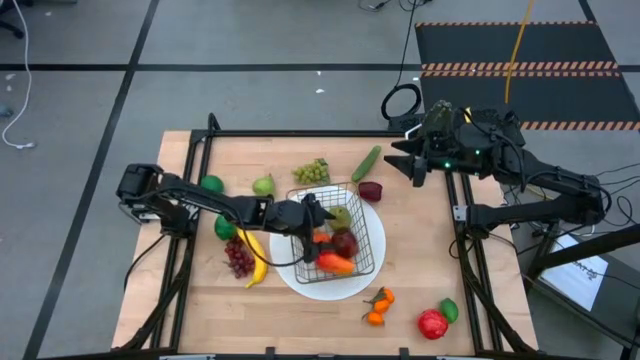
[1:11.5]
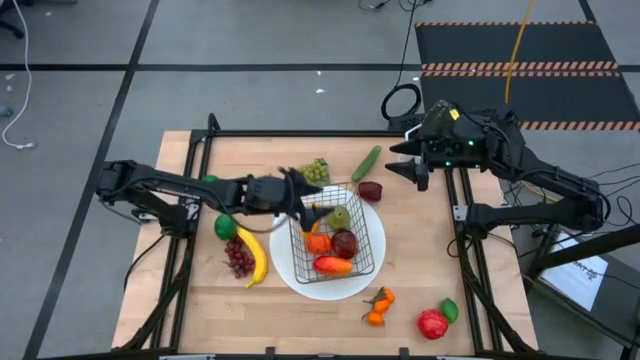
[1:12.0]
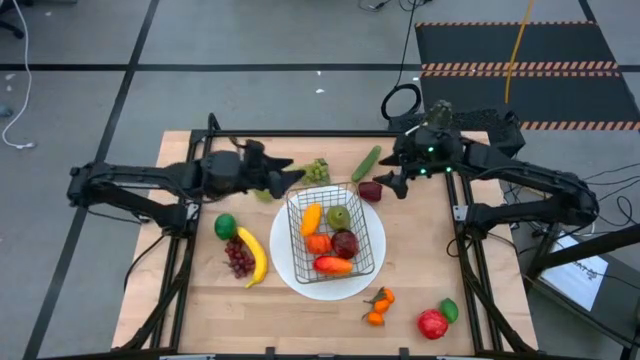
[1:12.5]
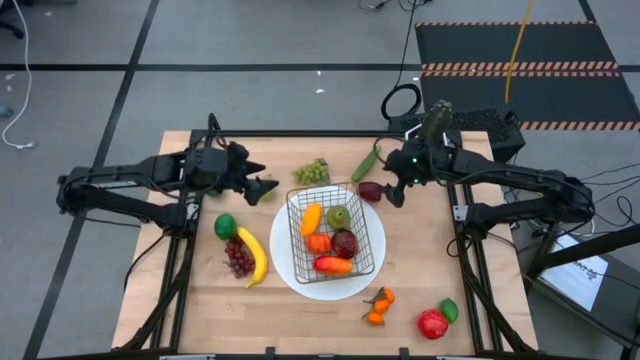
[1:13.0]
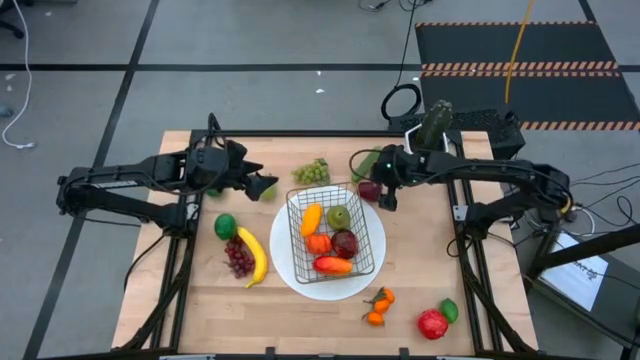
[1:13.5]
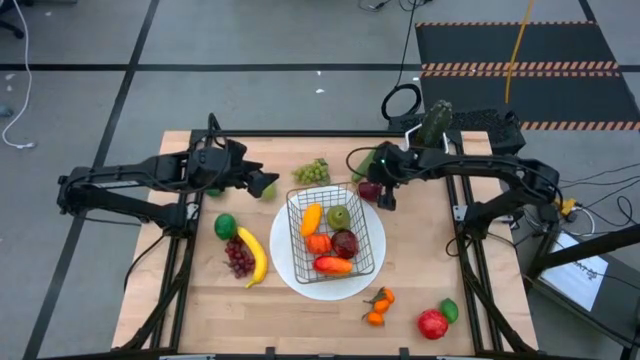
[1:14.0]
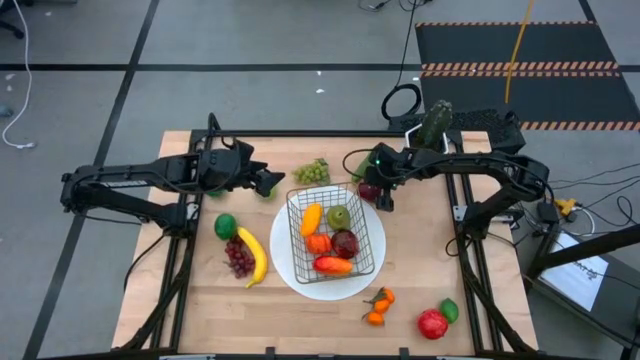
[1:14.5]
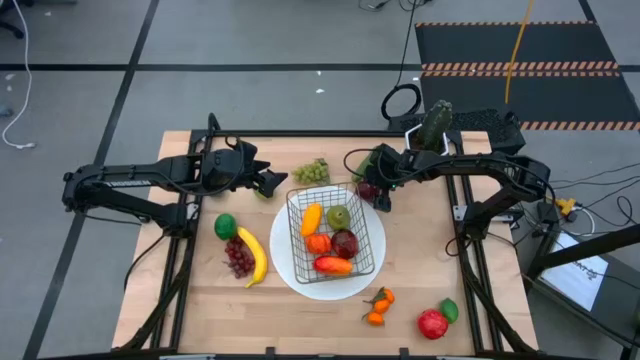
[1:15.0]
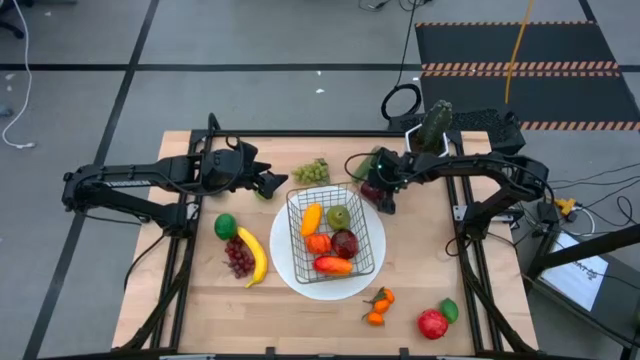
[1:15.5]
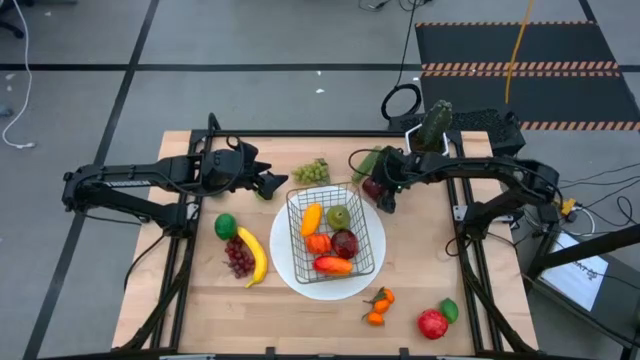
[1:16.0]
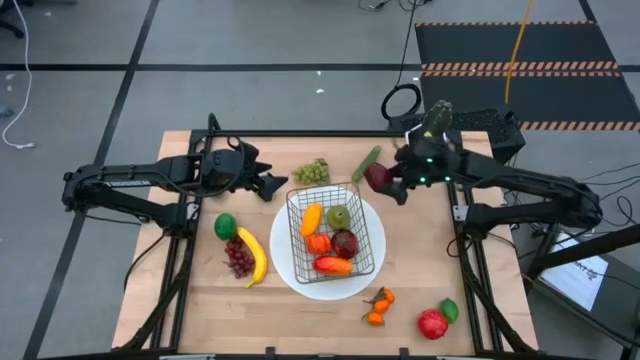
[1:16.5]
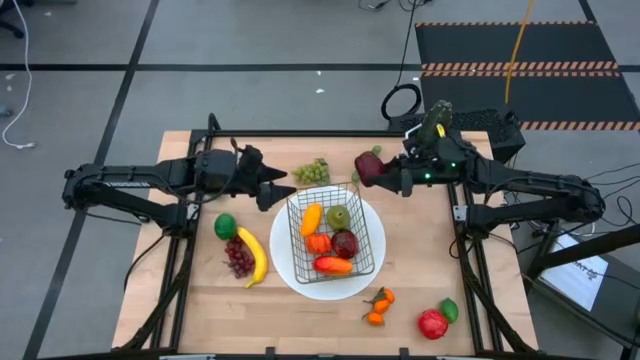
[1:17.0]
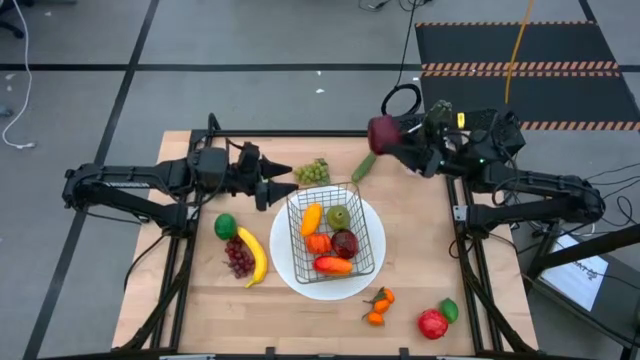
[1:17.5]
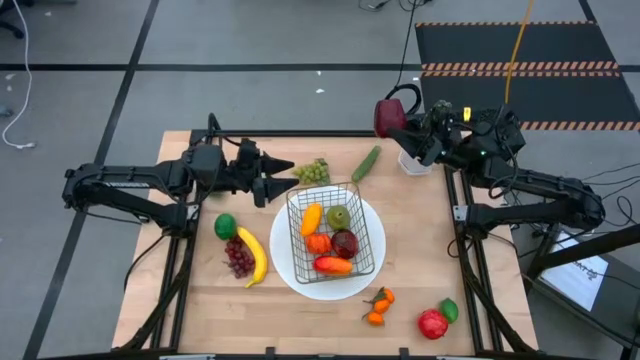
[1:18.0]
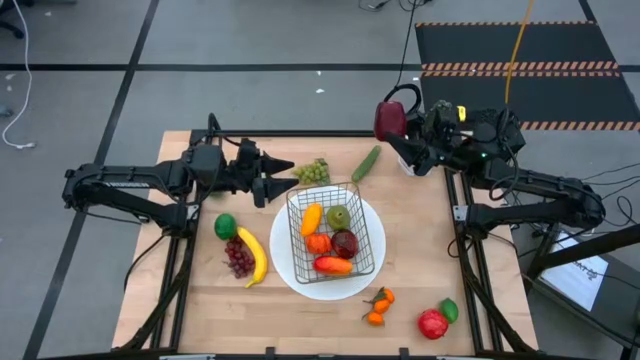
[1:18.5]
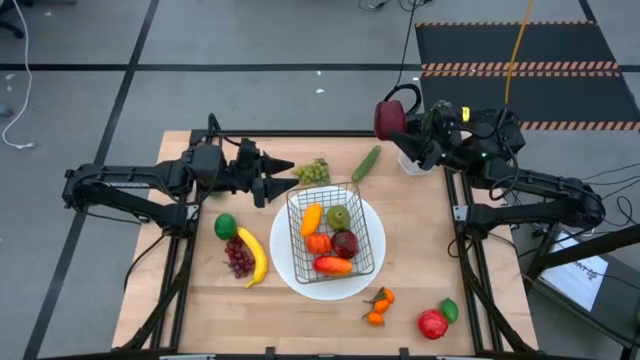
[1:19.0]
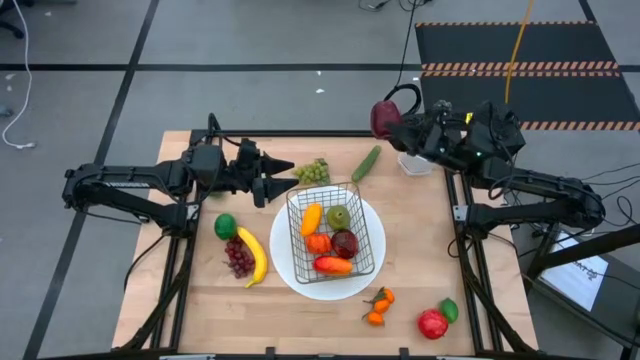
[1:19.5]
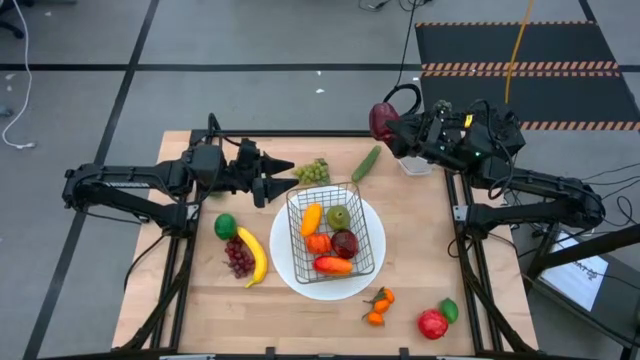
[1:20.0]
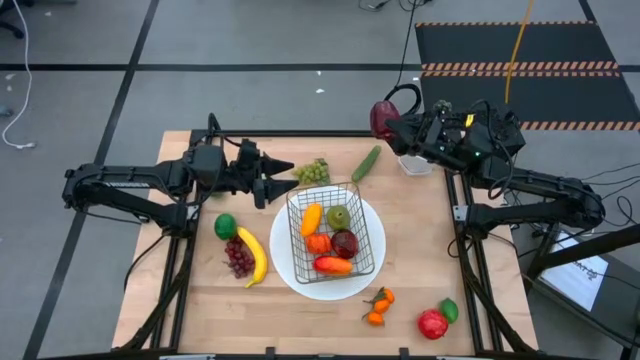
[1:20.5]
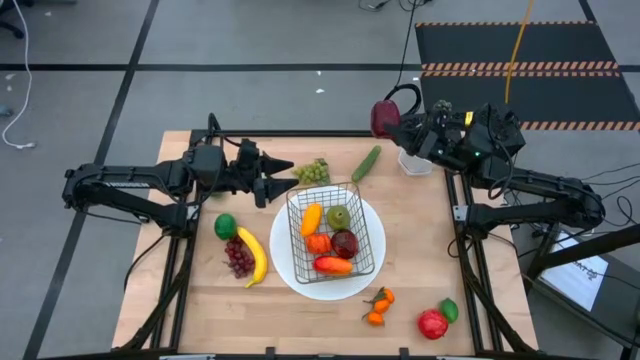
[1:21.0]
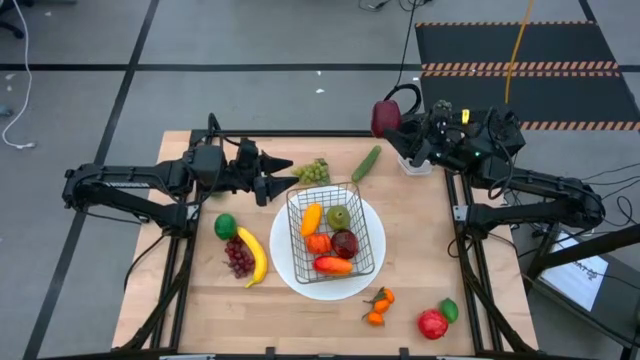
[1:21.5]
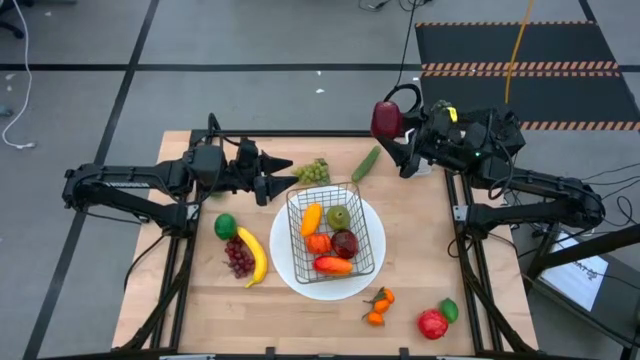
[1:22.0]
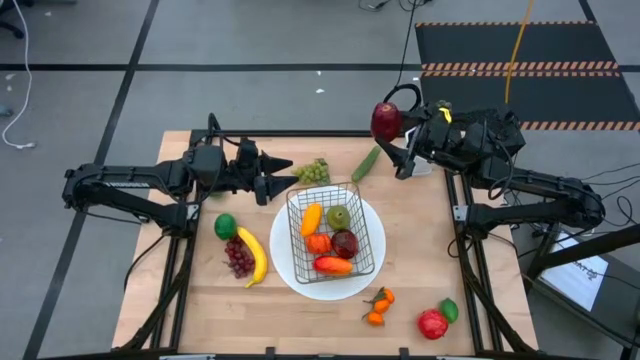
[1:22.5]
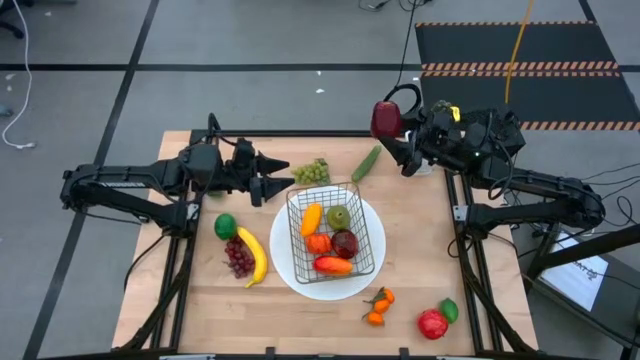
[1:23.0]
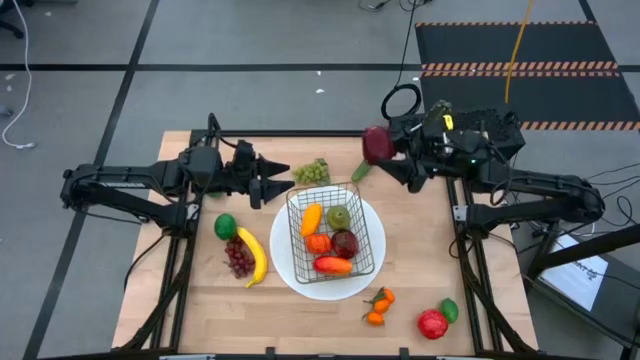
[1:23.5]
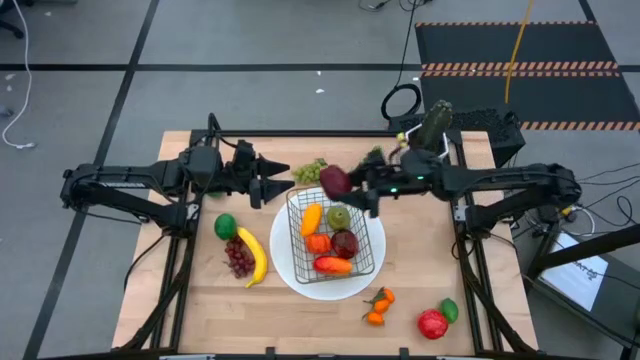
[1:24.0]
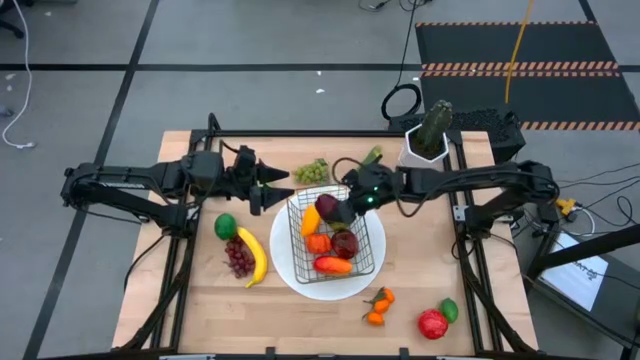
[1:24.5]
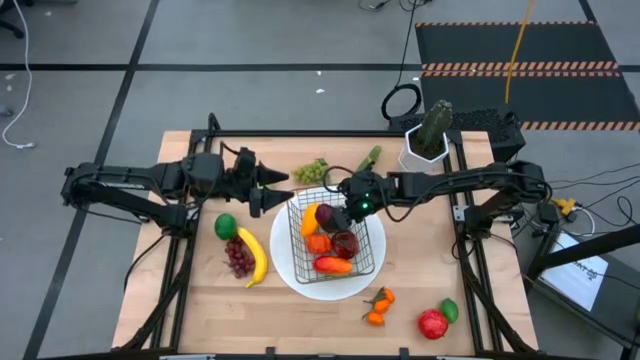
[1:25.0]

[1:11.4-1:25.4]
Task: Build produce basket
Put the dark red apple into the black wire basket

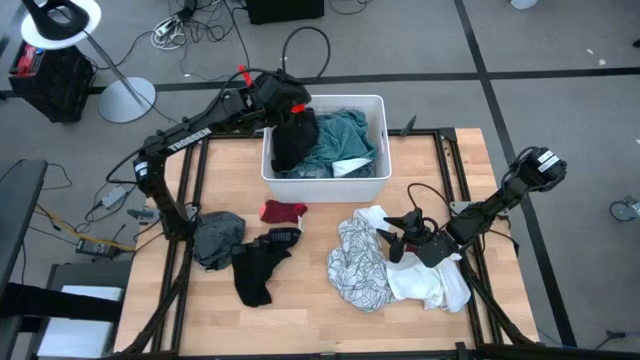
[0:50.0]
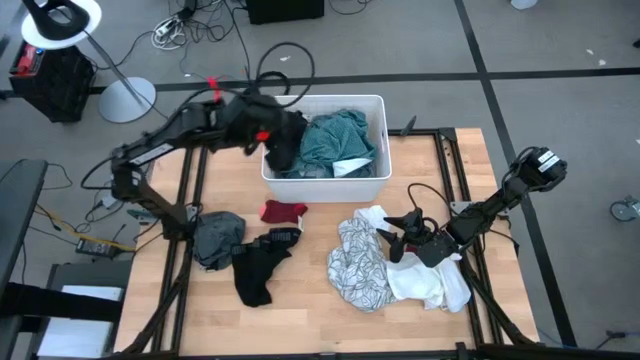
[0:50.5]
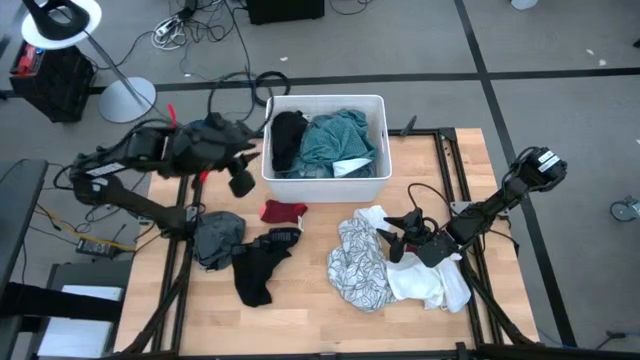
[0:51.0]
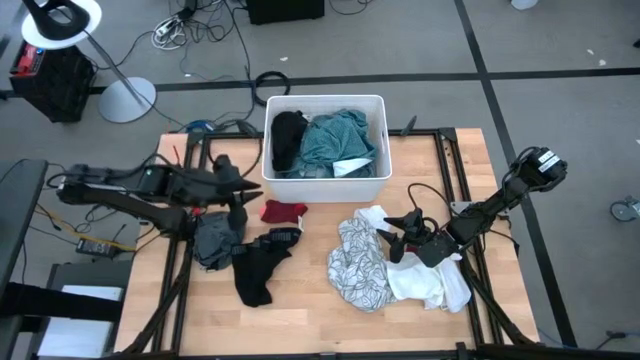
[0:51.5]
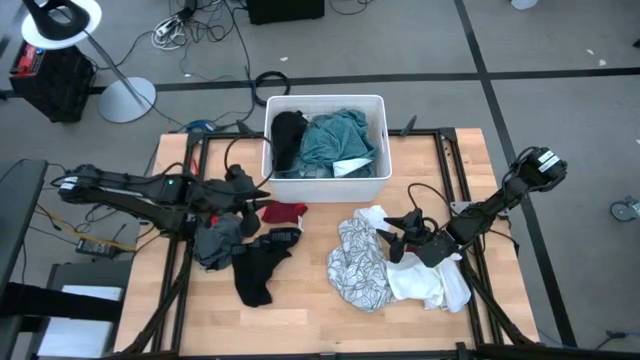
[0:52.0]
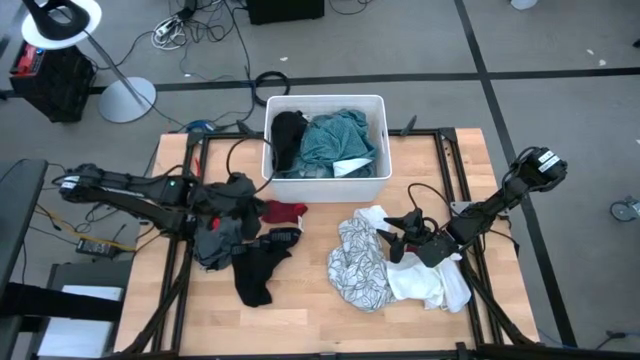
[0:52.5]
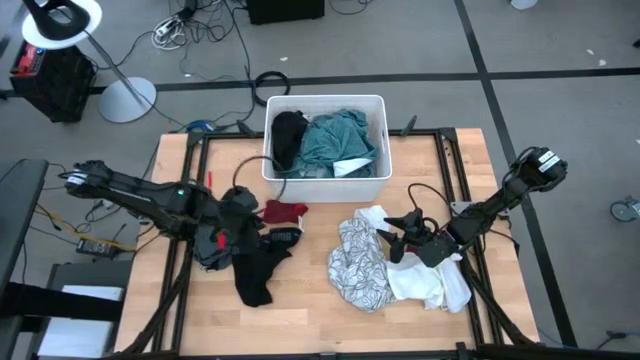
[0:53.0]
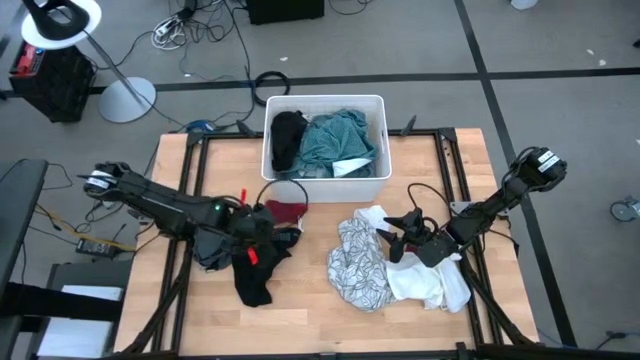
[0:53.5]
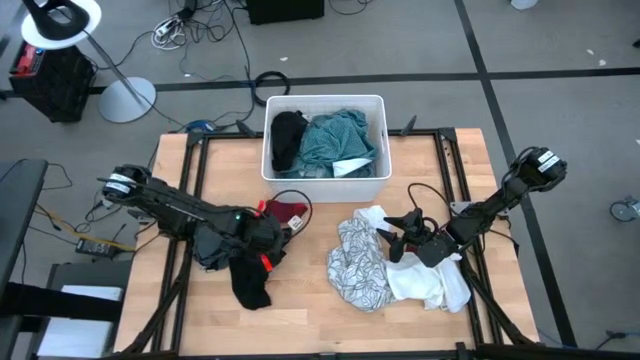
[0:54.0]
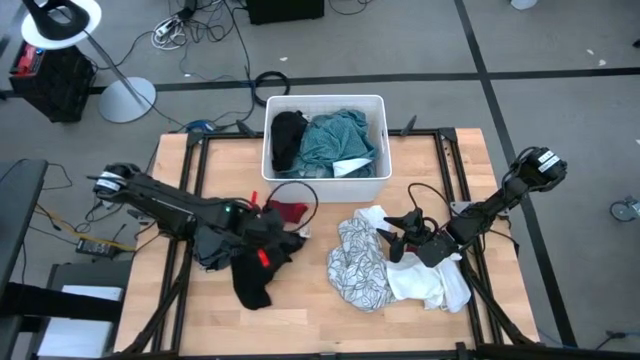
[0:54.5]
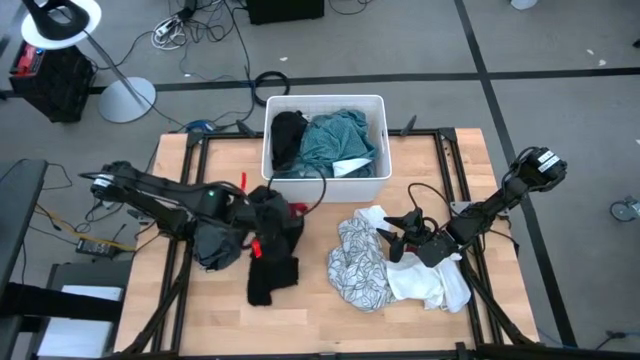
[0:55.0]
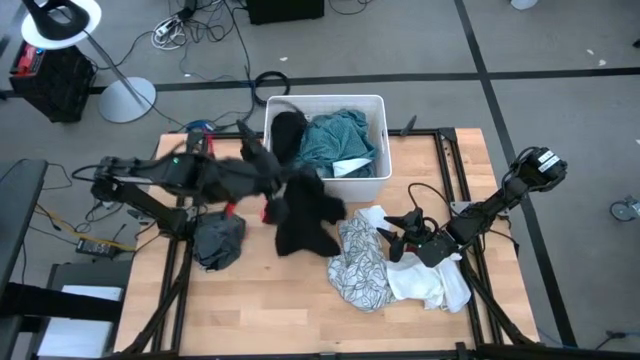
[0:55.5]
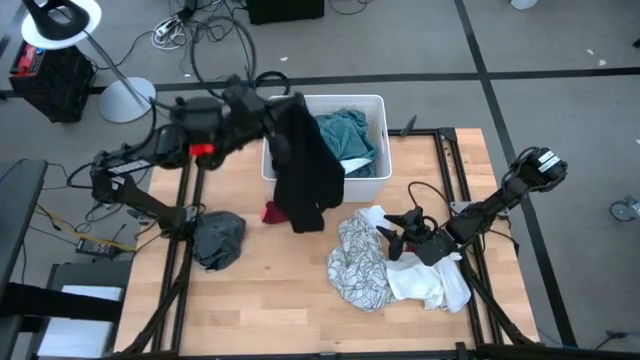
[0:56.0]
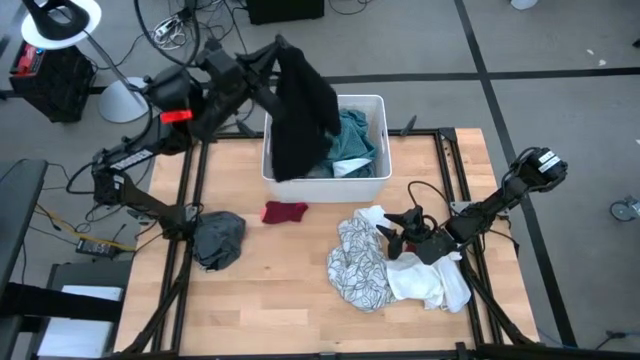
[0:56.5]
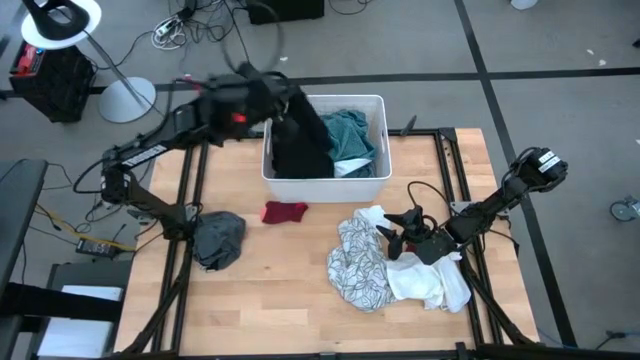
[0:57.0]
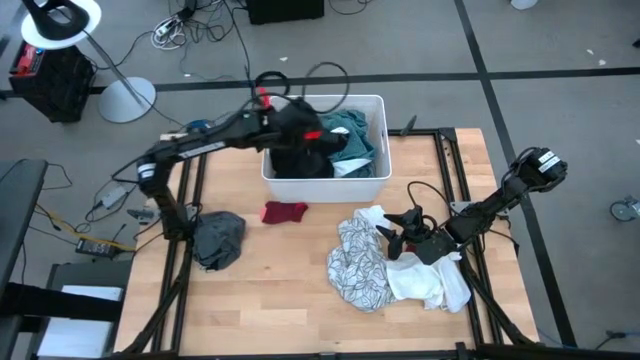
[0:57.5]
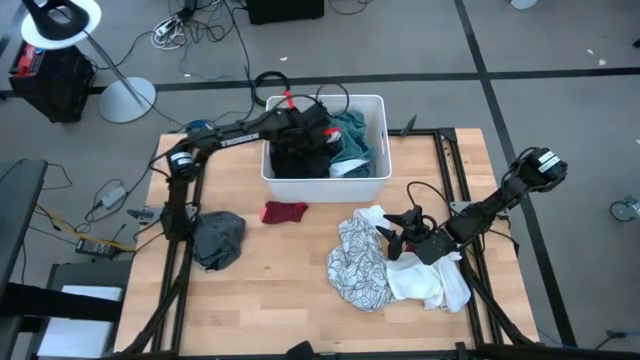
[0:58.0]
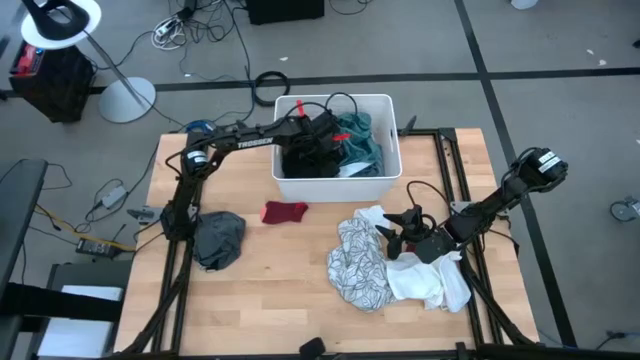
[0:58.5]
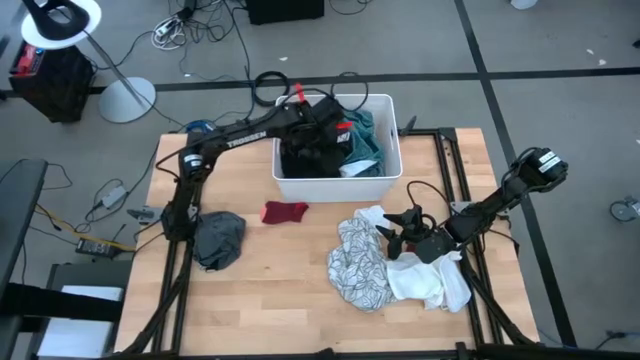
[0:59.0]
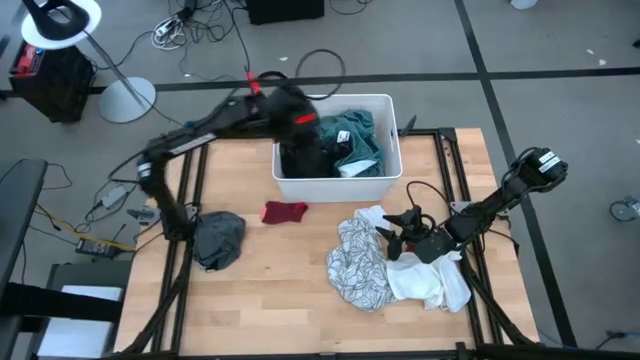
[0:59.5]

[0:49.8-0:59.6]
Task: Sort clothes
Put the black boxer into the white laundry bin
